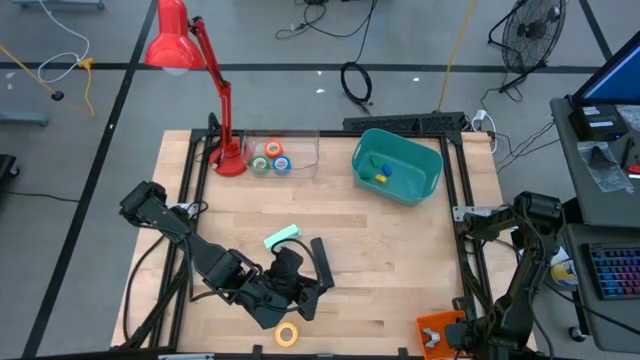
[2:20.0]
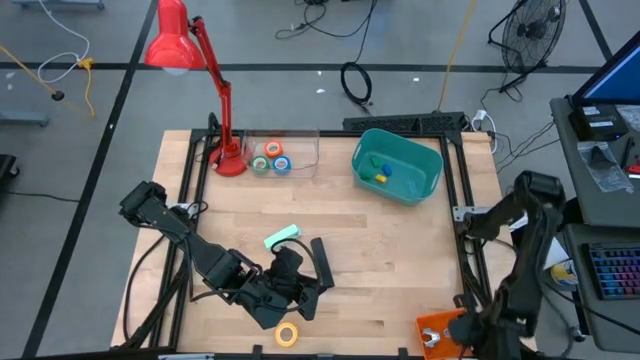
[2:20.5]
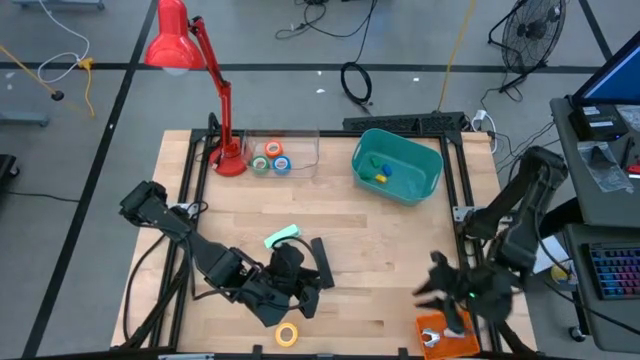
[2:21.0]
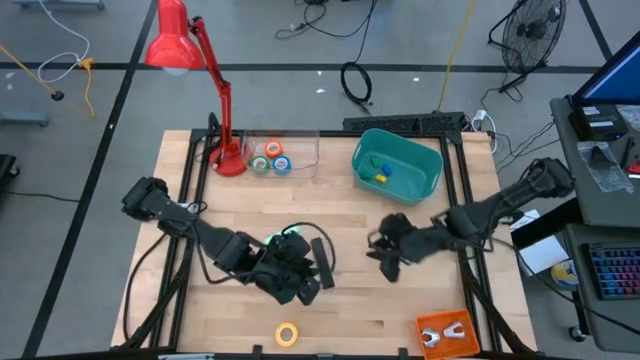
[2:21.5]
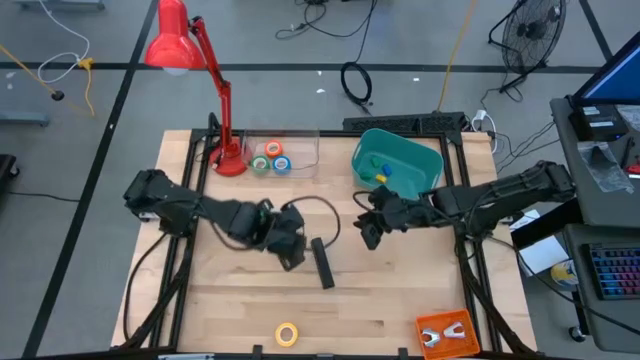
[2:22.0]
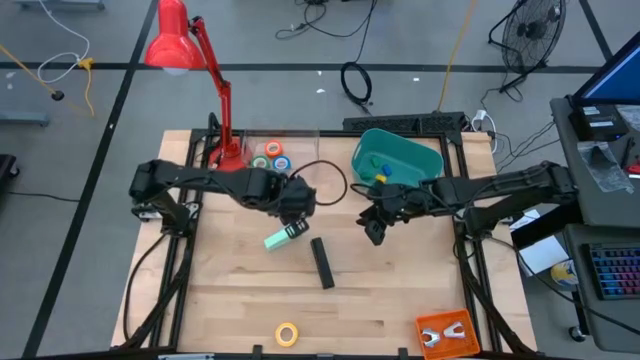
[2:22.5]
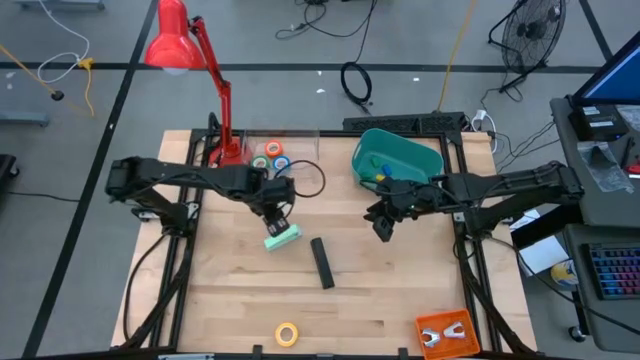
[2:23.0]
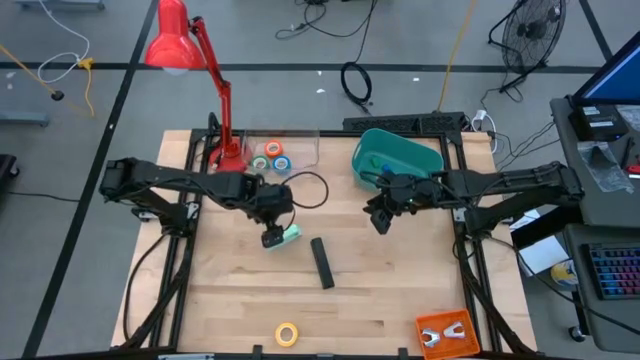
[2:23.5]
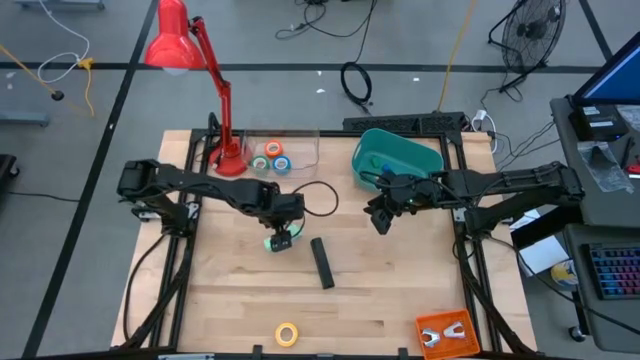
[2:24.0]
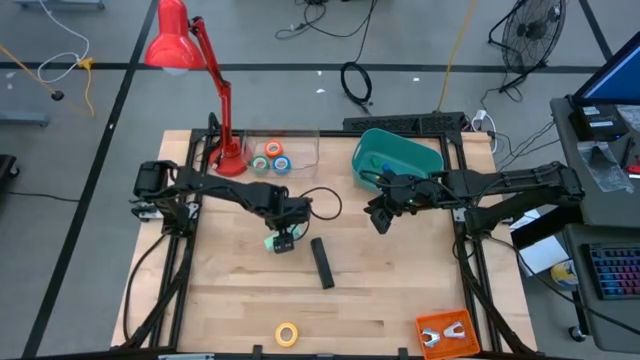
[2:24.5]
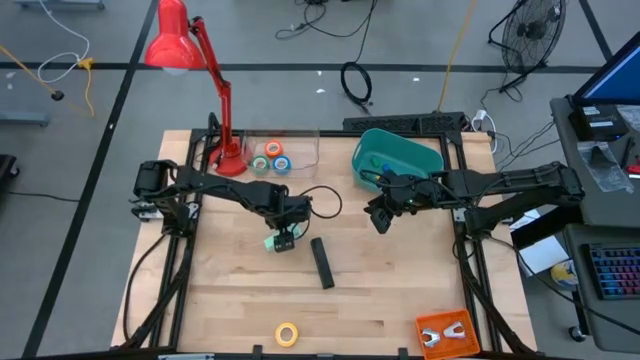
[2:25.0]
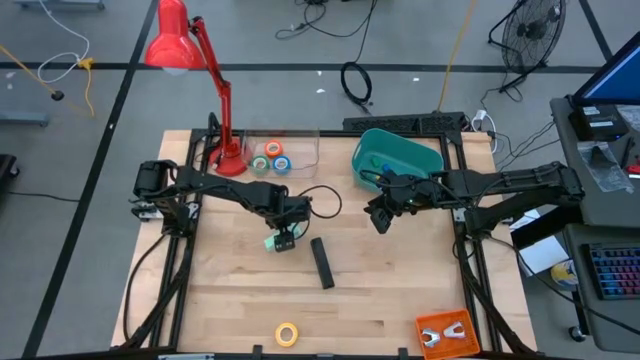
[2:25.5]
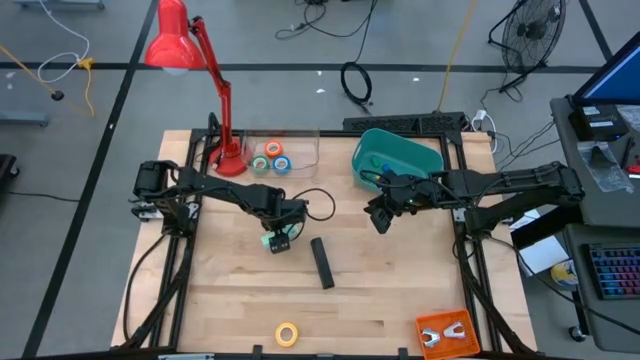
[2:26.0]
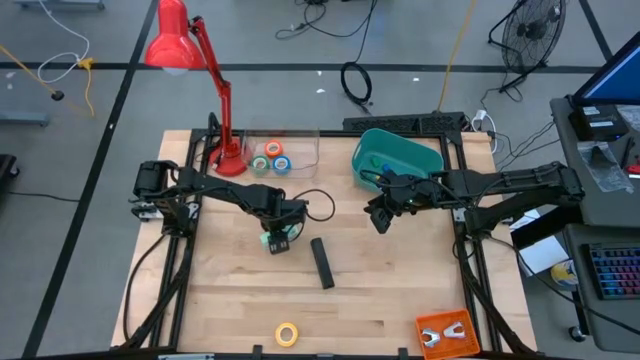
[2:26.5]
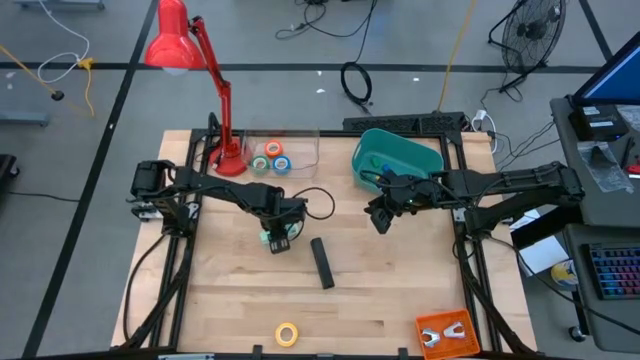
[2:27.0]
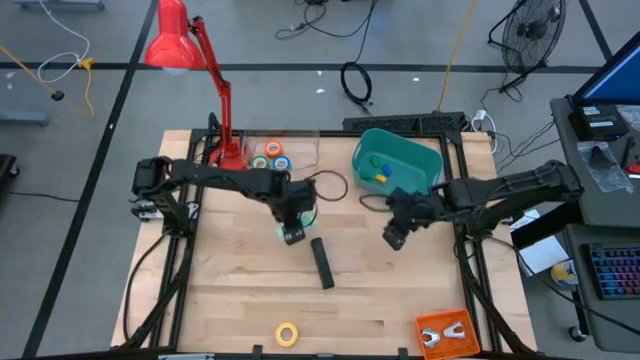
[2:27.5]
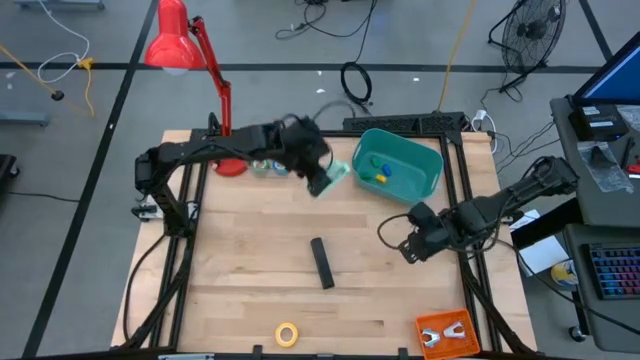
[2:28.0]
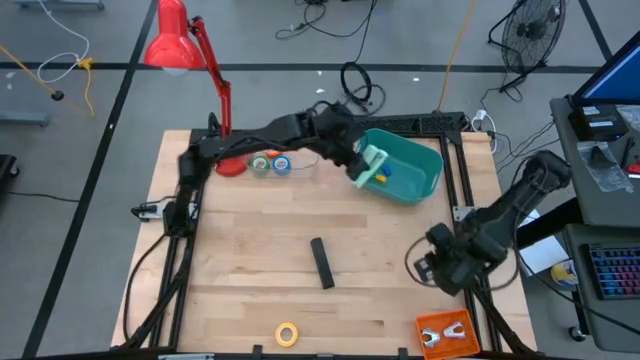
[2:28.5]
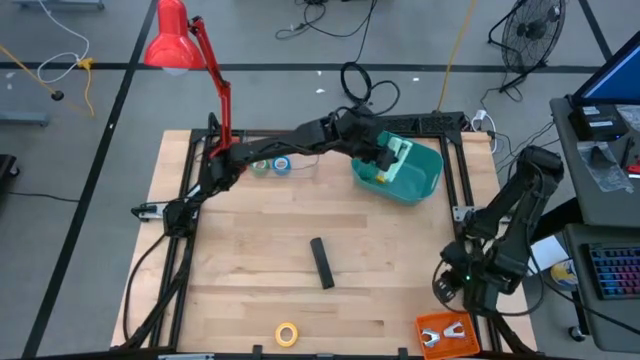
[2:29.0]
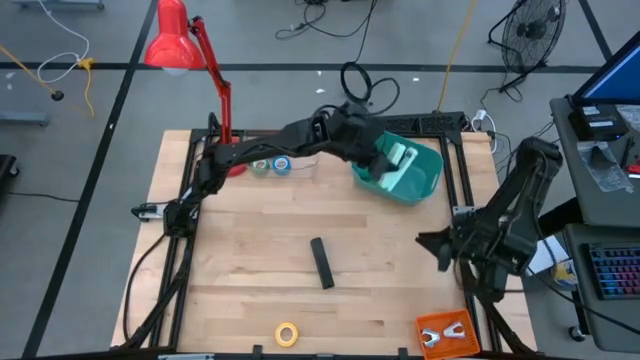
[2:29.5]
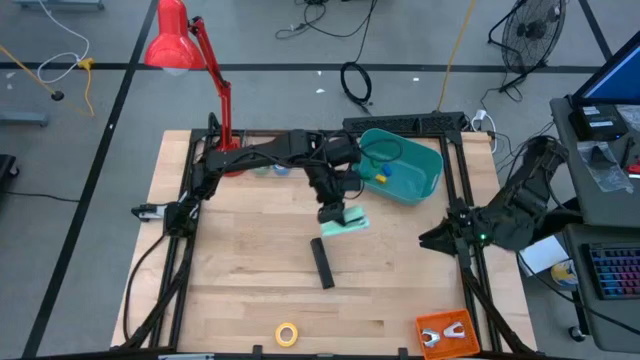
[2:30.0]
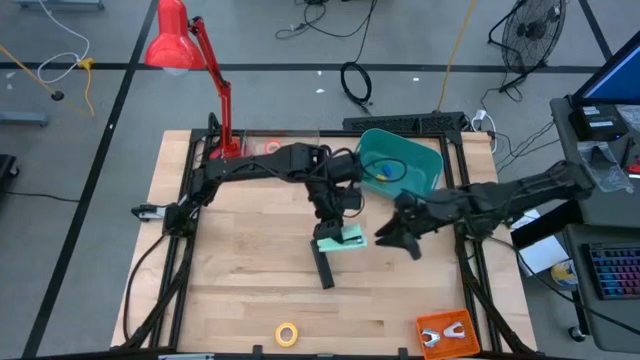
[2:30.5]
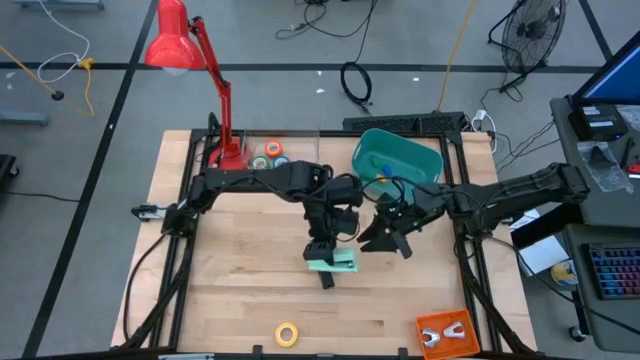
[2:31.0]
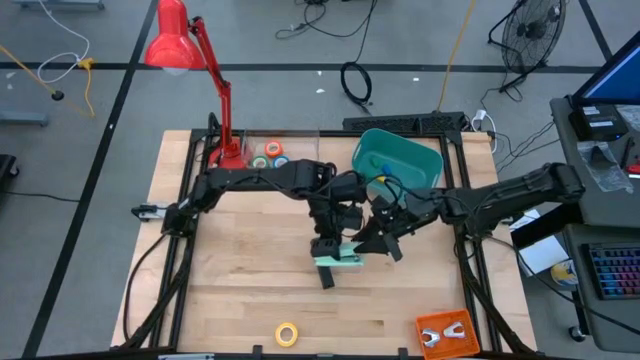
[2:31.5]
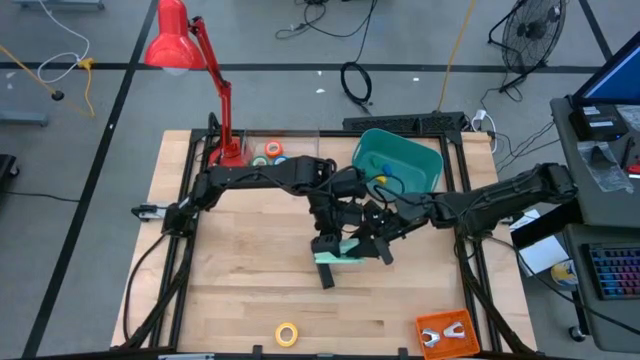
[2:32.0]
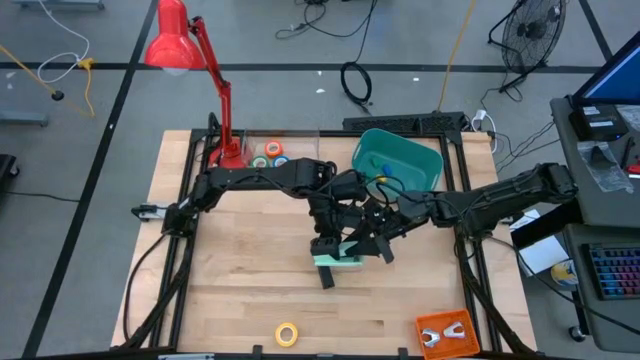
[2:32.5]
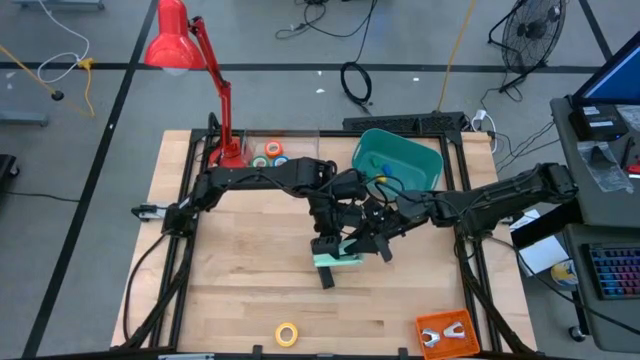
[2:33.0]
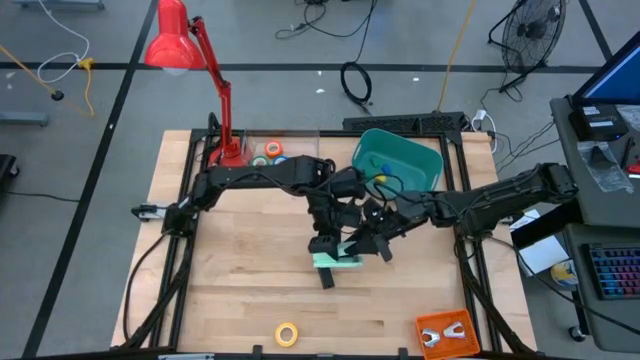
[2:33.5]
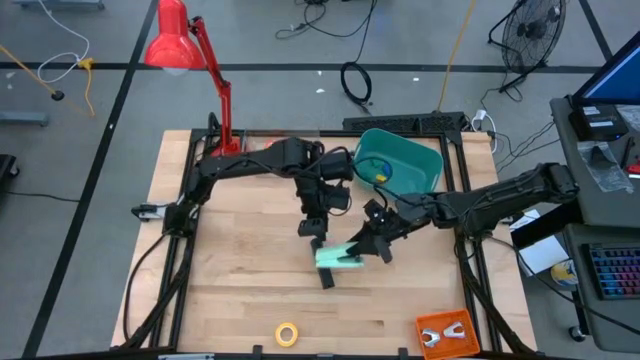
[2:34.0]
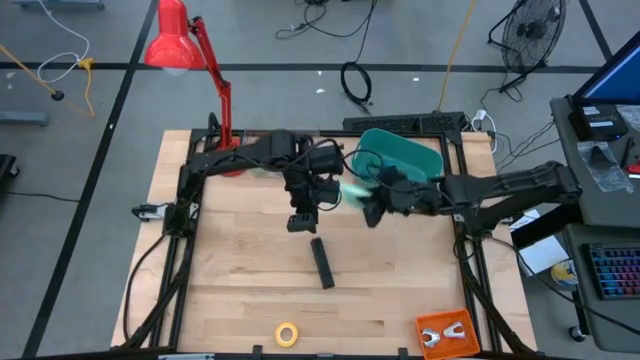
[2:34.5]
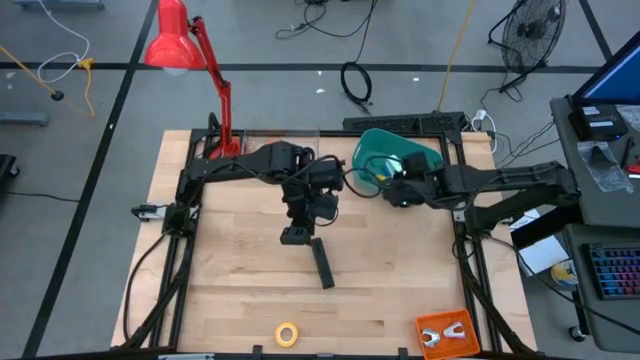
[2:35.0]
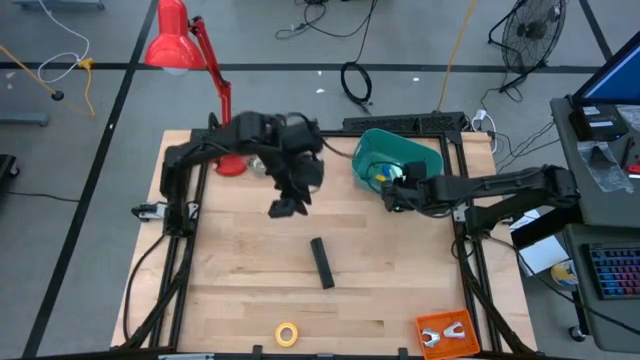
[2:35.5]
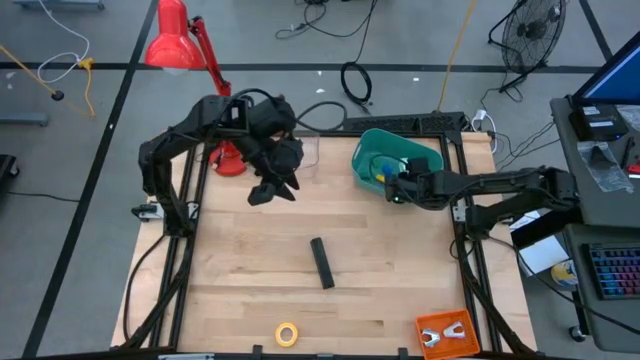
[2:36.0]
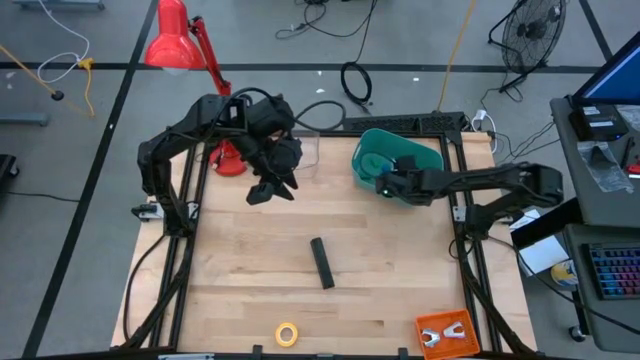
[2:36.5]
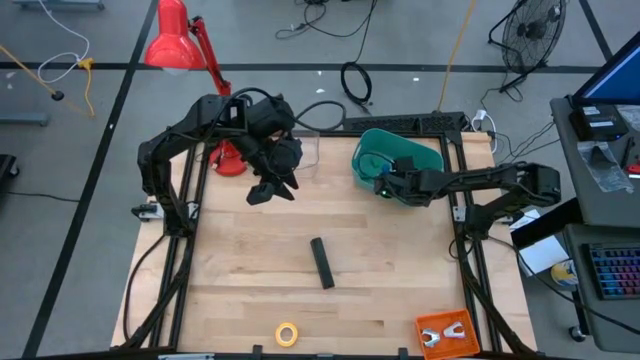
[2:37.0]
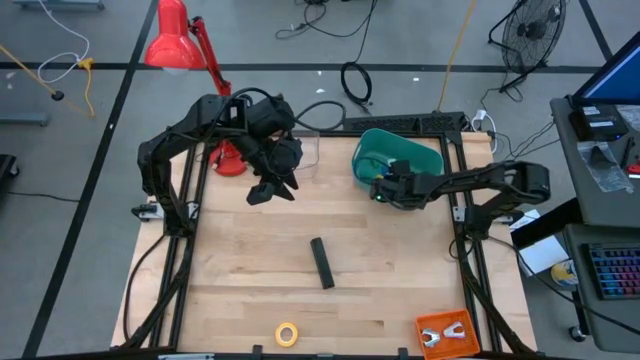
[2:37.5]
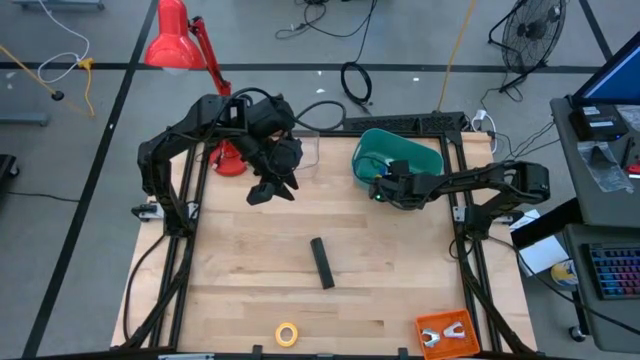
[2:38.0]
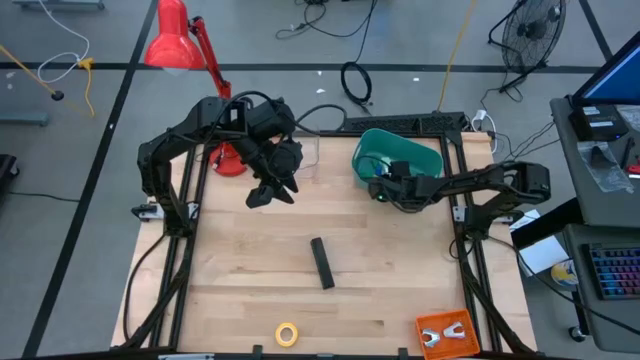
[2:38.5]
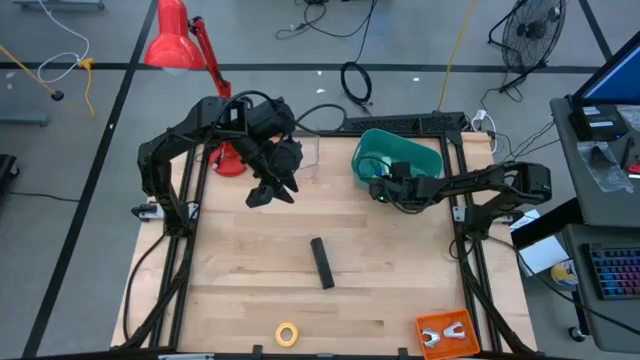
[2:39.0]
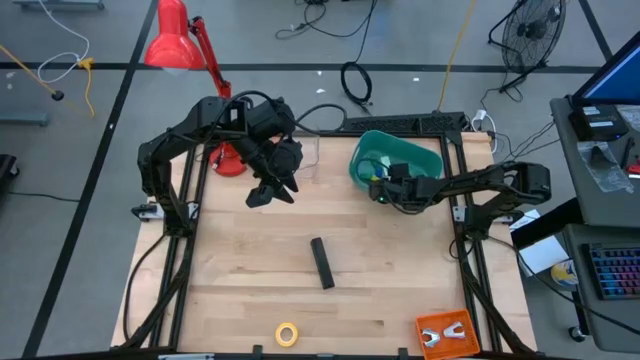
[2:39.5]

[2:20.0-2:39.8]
Task: Pick and place Stapler, Stapler remover, tape
Put the light green stapler into the green bin

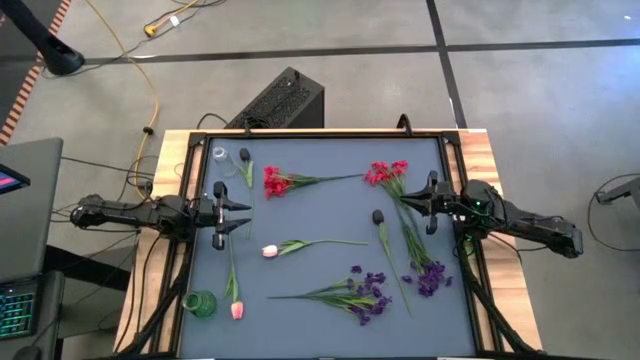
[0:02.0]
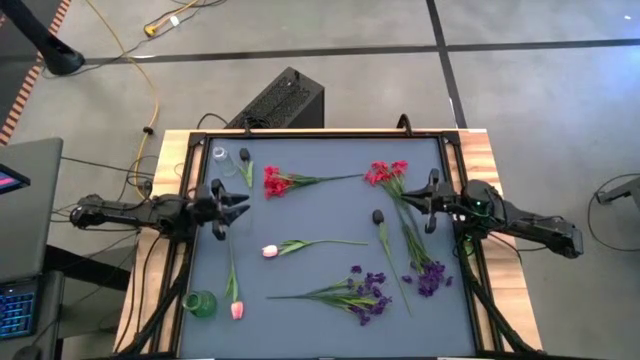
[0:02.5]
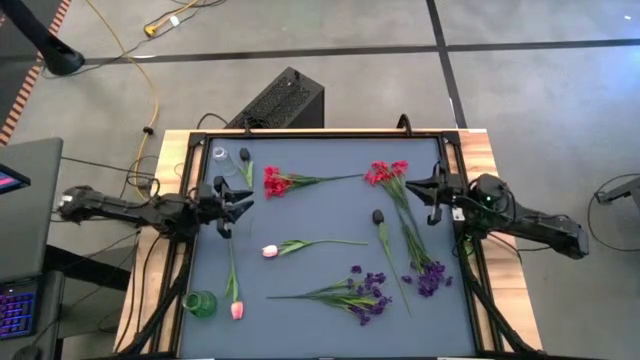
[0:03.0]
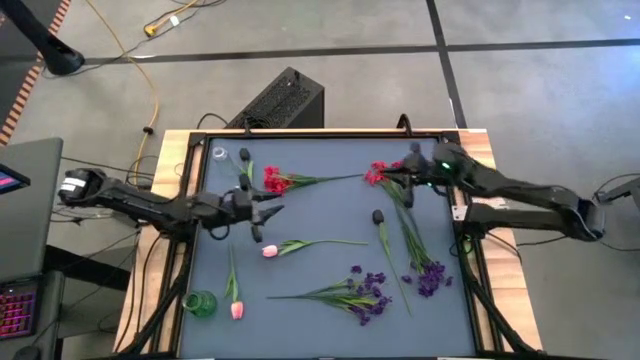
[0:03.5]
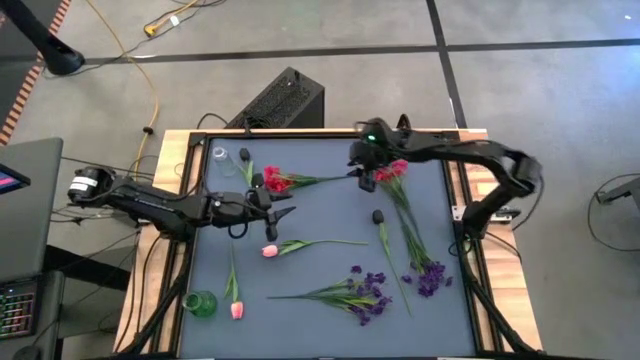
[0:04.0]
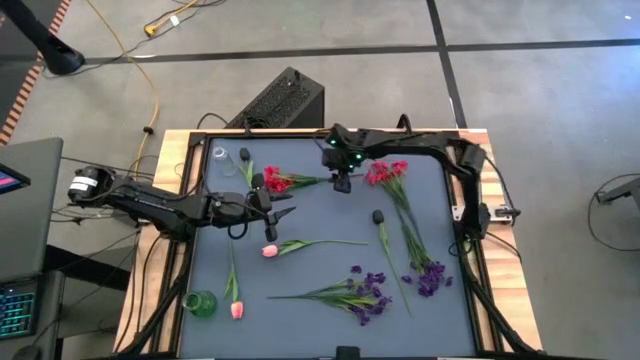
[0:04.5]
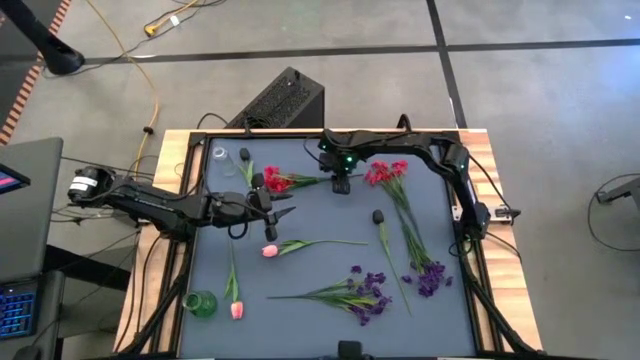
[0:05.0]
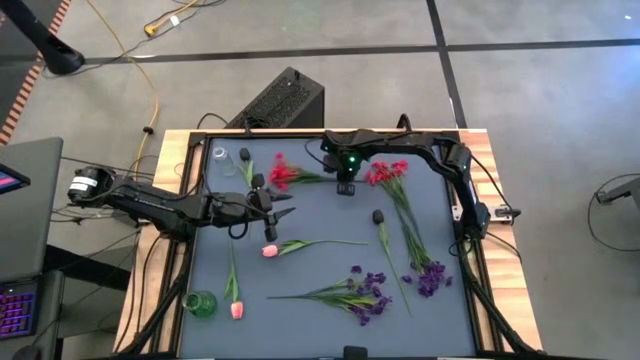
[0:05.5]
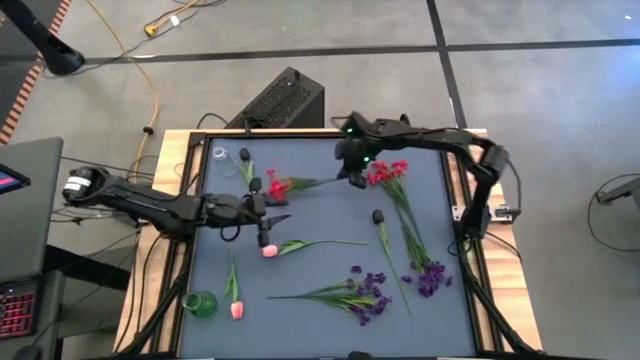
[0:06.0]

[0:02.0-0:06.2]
Task: Sort flowers into vase by color
Put the left red flowers into the transparent vase
